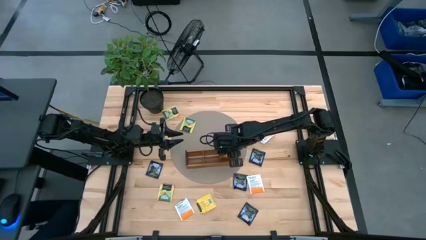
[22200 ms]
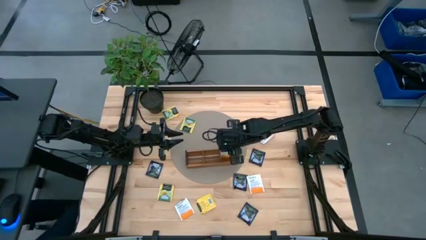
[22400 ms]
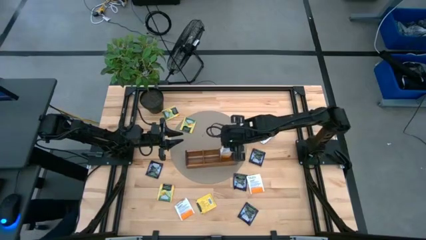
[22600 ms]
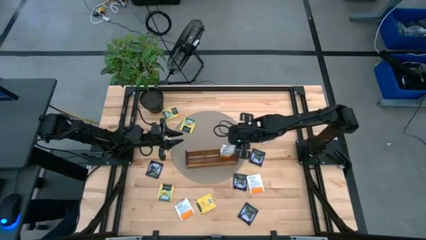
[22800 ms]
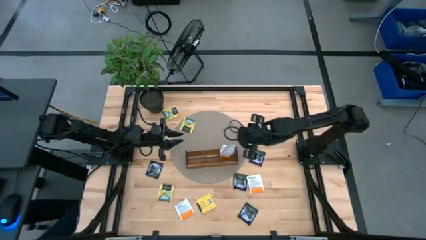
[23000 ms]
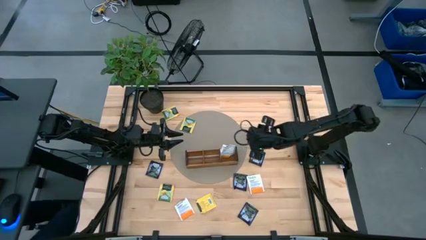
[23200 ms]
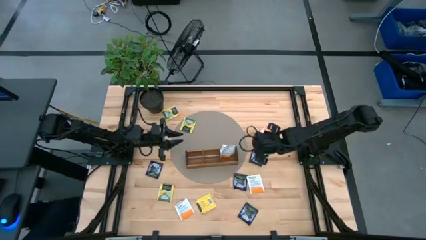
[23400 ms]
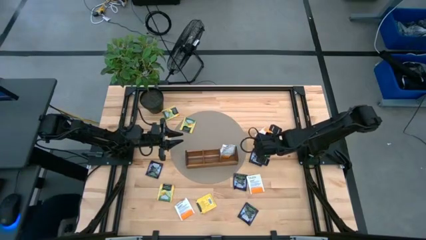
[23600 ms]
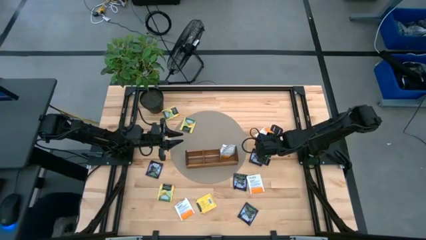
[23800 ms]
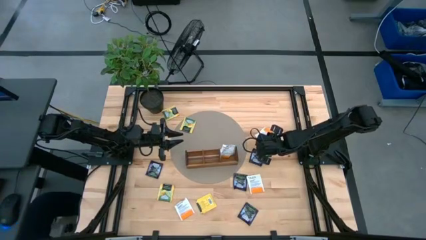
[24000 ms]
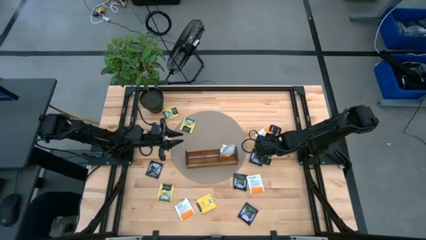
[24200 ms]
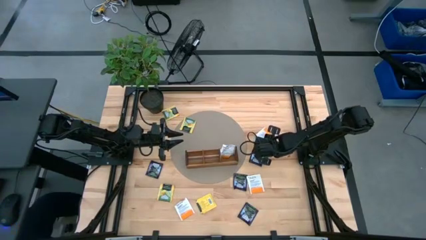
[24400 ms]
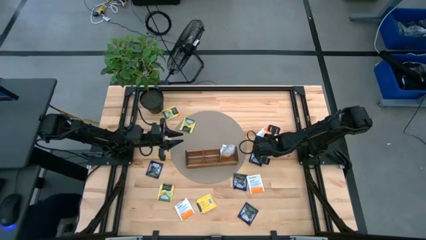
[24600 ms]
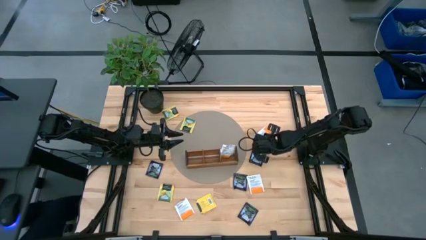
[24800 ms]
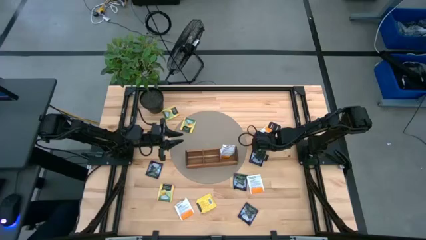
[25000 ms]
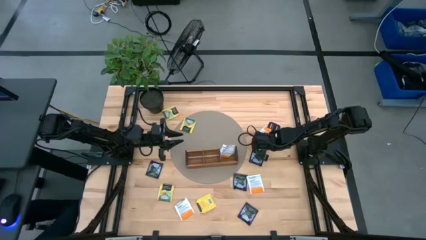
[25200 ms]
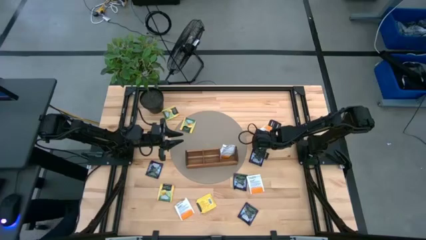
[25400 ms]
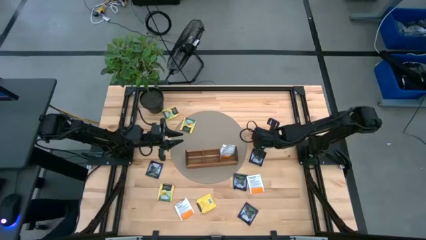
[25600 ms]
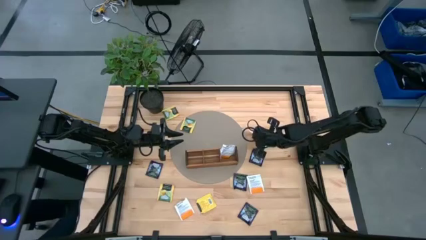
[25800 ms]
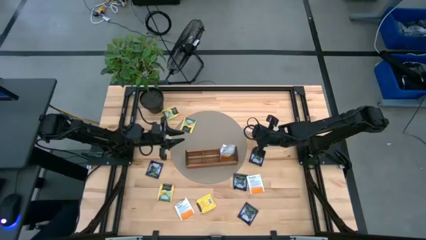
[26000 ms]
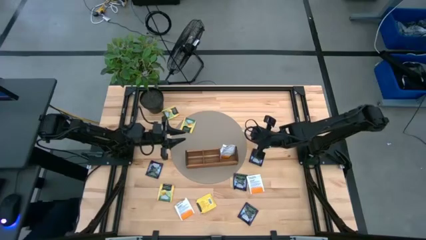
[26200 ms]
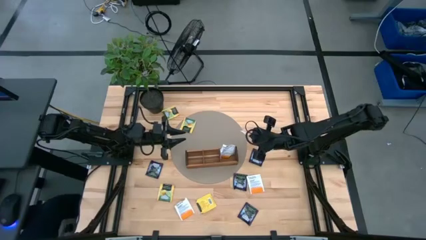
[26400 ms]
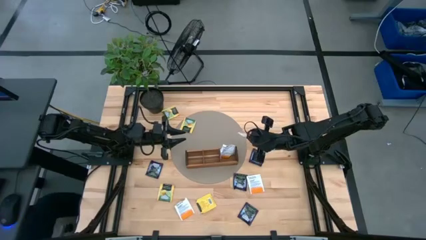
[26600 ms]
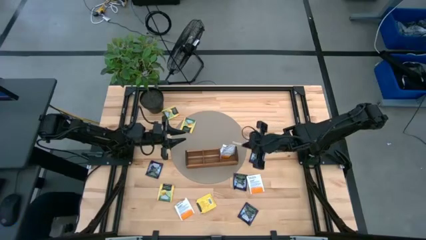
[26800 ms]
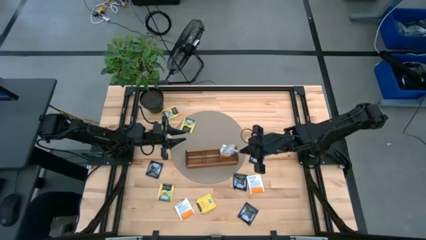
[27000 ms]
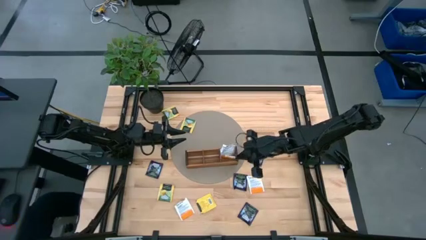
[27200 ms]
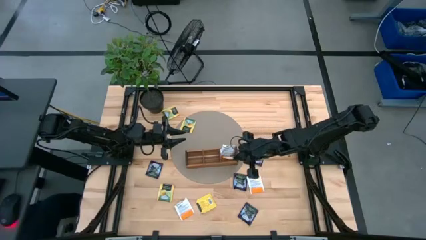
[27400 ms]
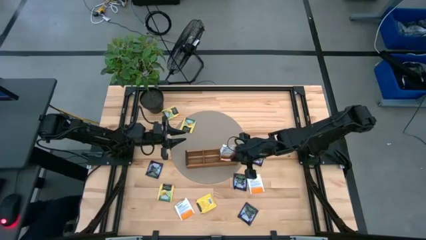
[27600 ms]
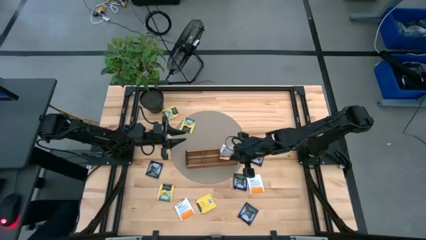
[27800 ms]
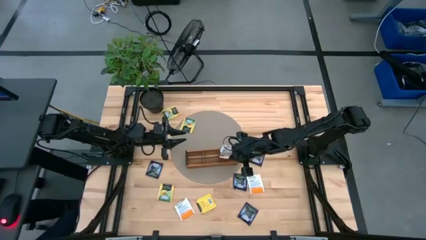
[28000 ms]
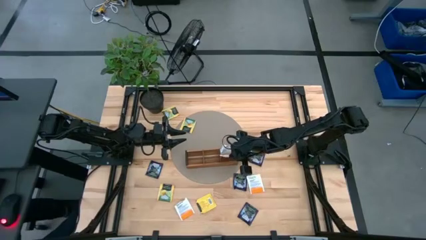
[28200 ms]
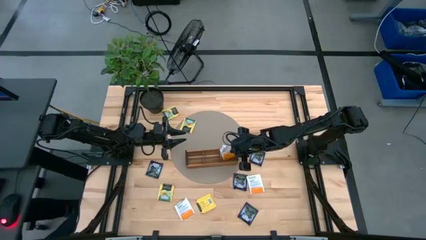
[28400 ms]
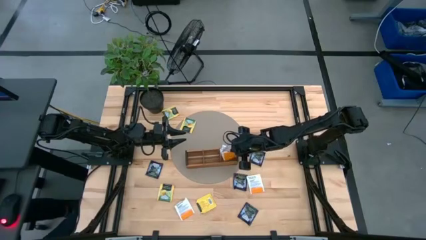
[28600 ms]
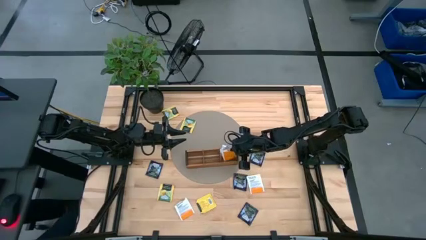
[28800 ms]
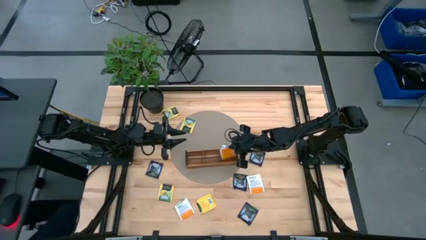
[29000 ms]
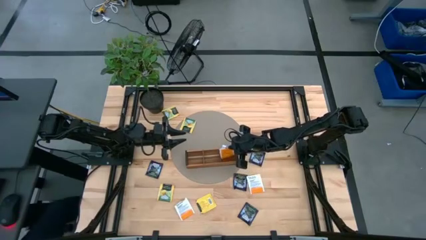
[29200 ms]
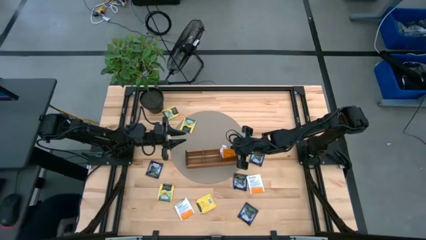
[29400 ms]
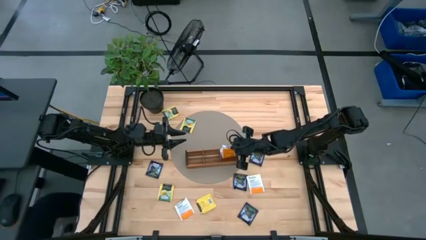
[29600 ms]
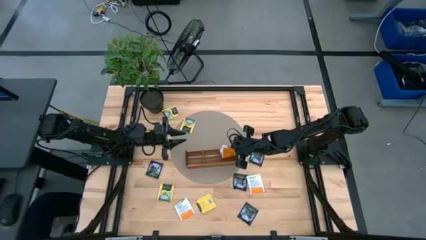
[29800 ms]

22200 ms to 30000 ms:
Task: Pick & Place Tea
Put the white tea bag into the right section of the wooden organizer

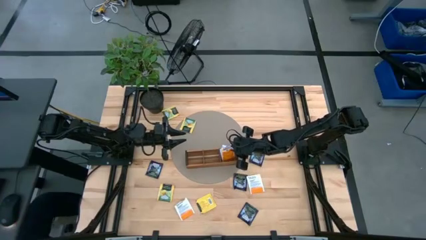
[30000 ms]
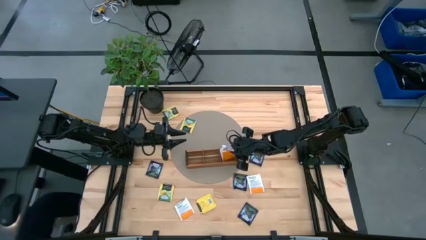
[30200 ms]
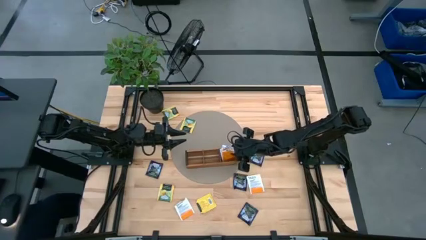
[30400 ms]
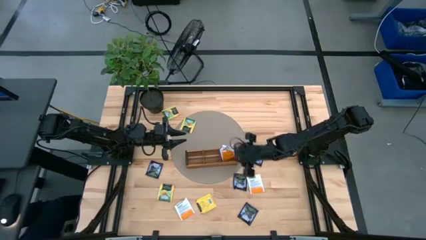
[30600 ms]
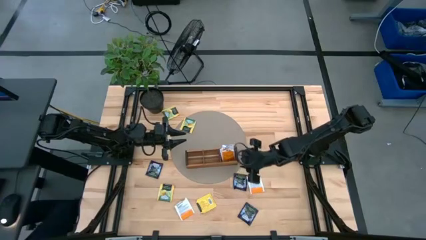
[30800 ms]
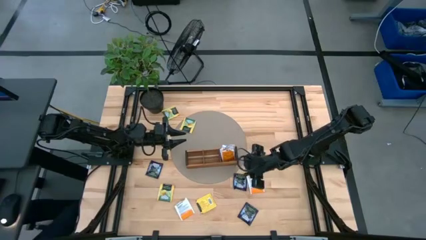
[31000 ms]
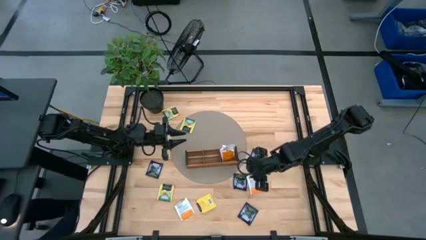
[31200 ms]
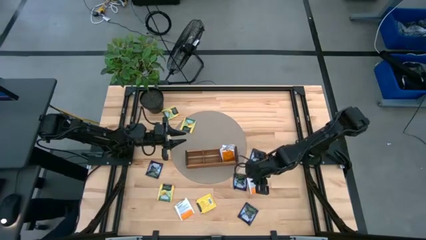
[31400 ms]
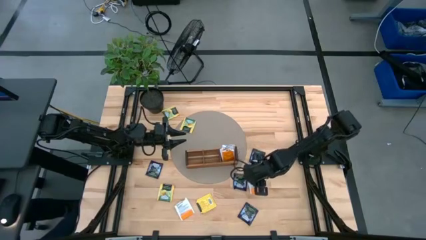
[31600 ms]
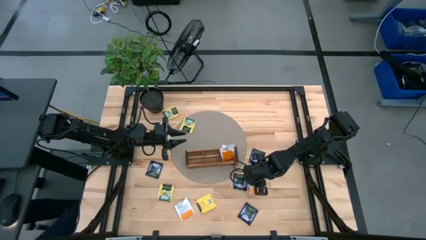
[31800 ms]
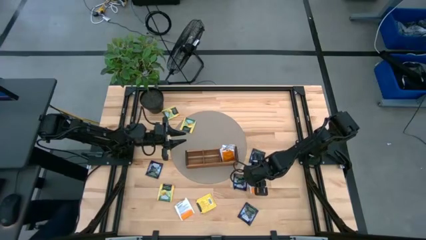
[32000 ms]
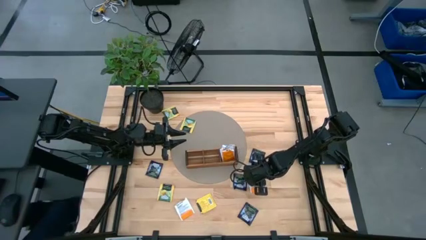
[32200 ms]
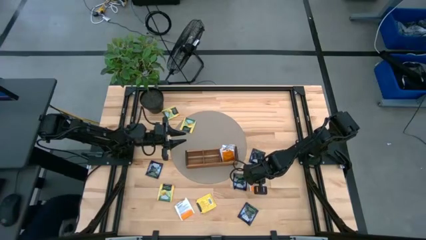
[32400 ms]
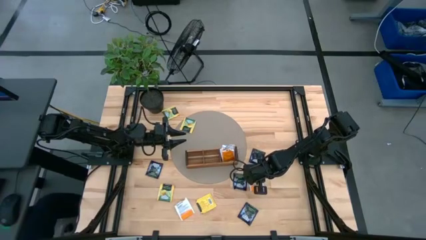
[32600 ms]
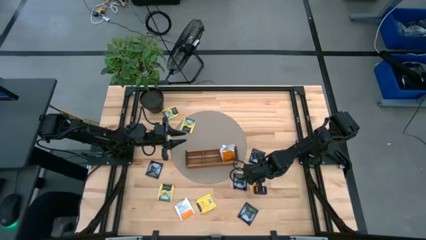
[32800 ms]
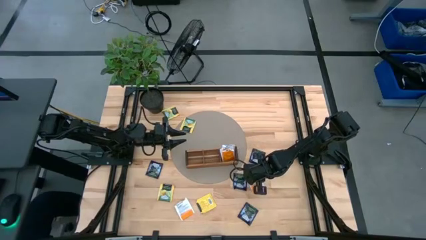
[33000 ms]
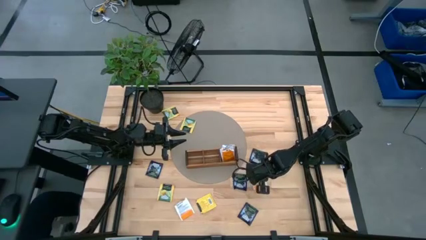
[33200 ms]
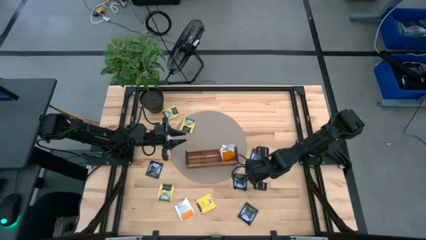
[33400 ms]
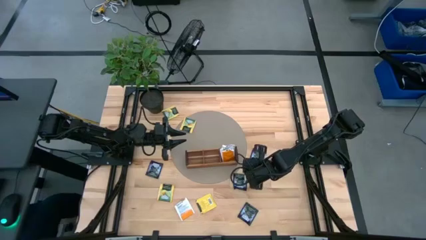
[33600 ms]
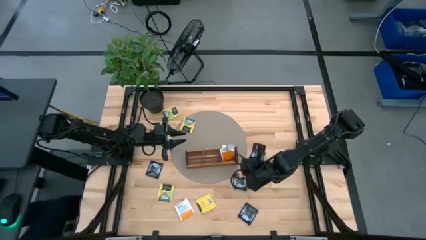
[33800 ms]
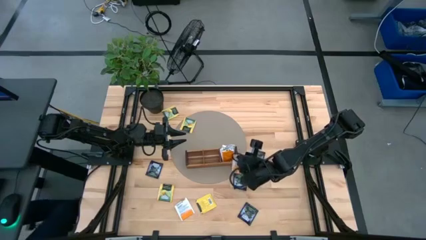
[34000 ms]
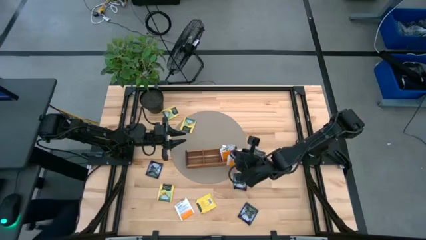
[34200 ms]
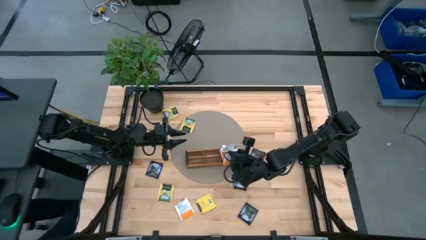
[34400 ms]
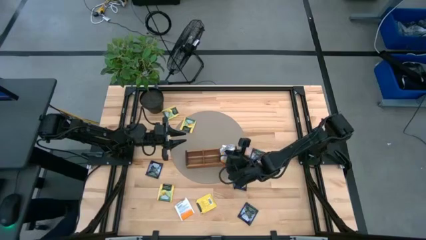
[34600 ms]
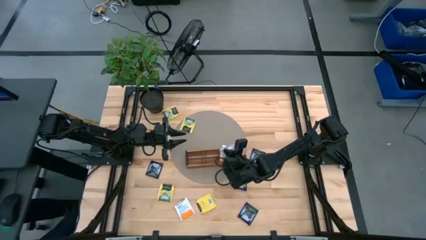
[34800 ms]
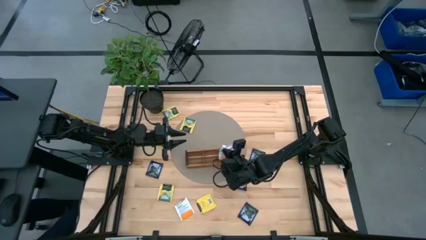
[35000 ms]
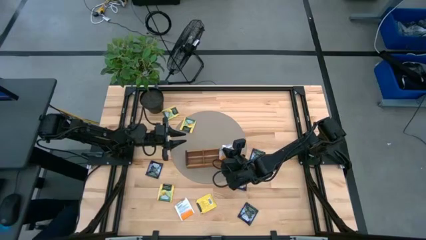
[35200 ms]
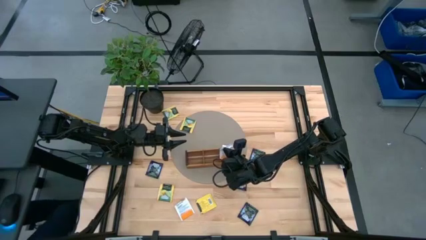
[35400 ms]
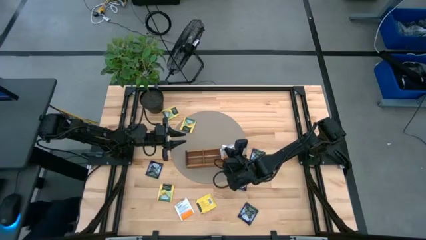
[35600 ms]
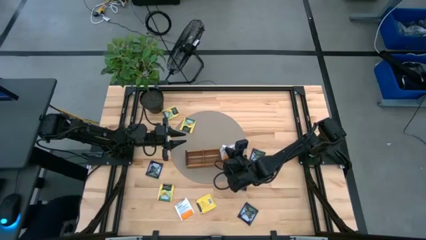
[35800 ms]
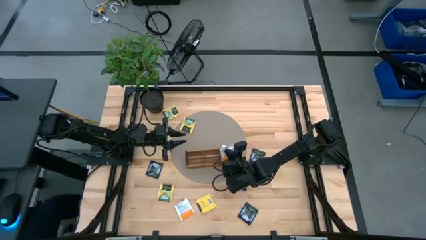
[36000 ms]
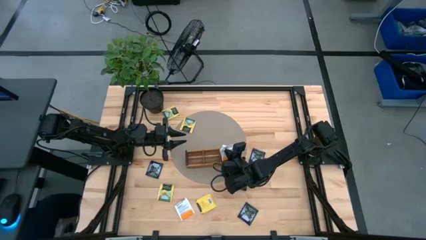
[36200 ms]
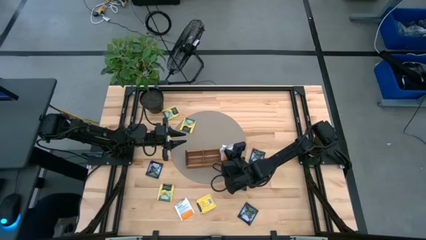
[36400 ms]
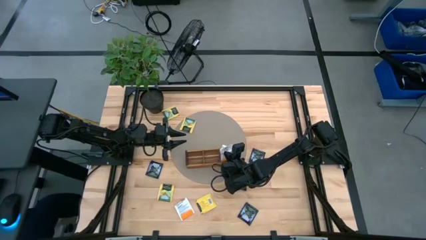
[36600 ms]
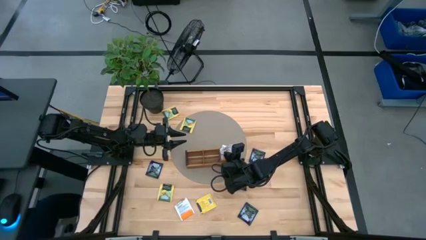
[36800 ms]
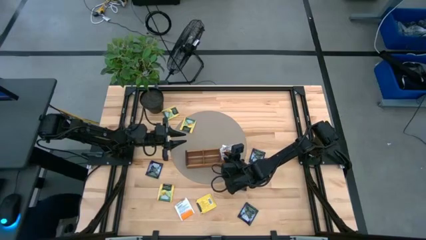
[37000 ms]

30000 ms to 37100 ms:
Put the white tea bag into the right section of the wooden organizer

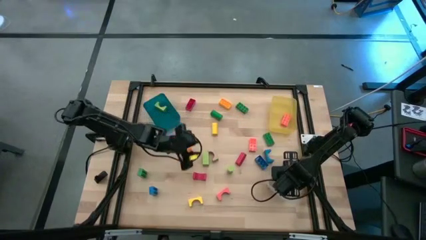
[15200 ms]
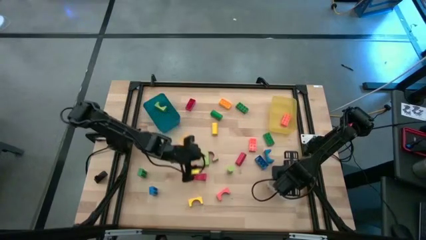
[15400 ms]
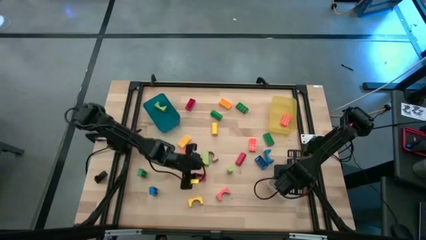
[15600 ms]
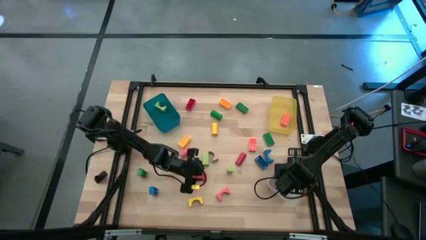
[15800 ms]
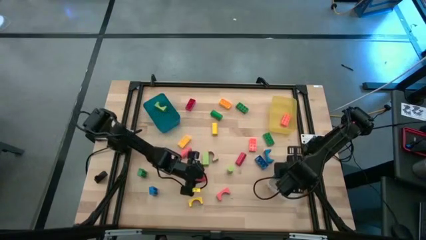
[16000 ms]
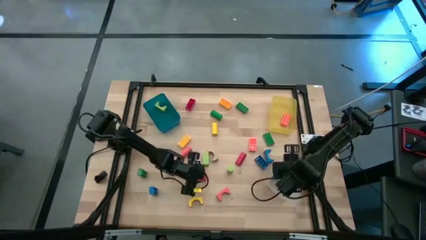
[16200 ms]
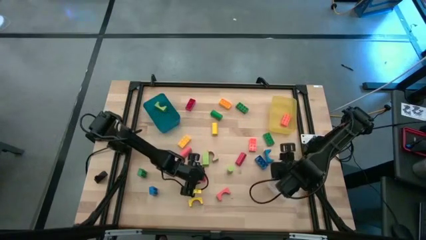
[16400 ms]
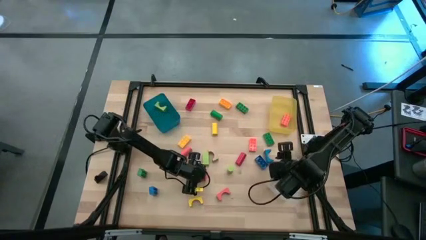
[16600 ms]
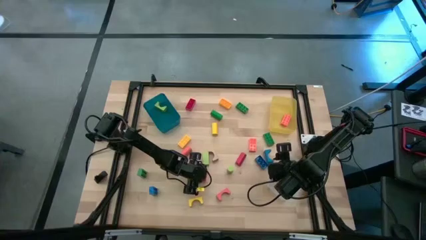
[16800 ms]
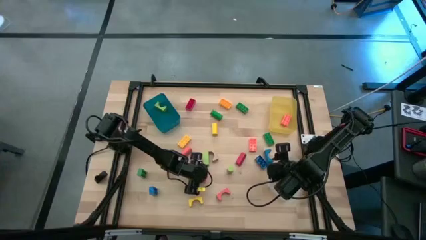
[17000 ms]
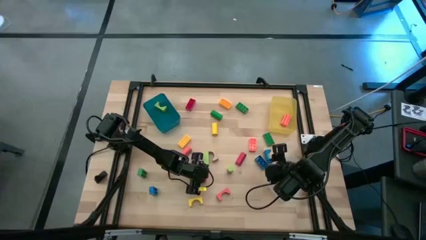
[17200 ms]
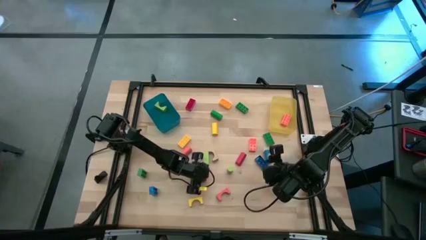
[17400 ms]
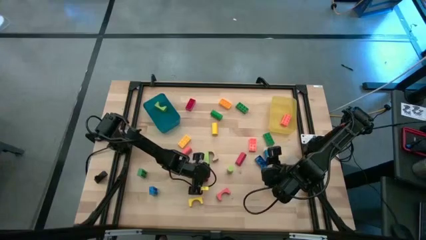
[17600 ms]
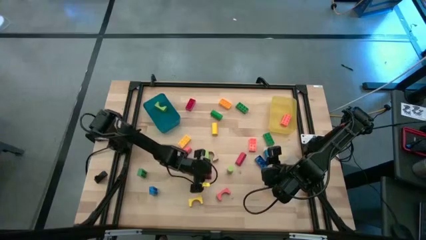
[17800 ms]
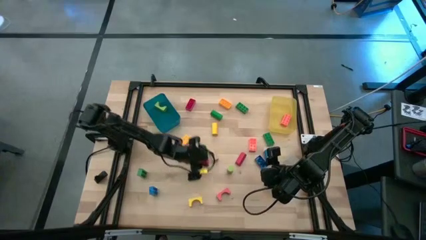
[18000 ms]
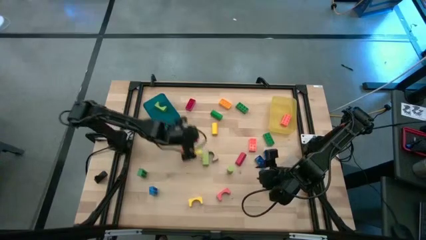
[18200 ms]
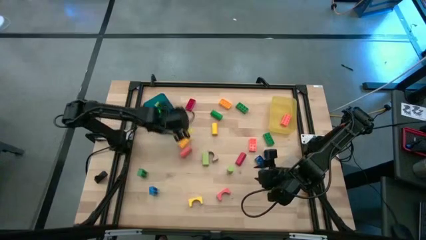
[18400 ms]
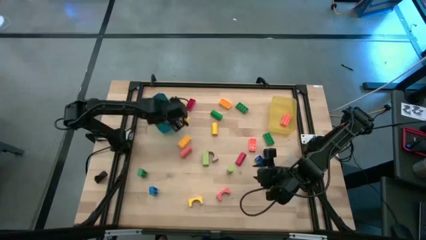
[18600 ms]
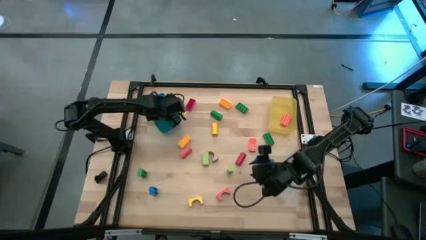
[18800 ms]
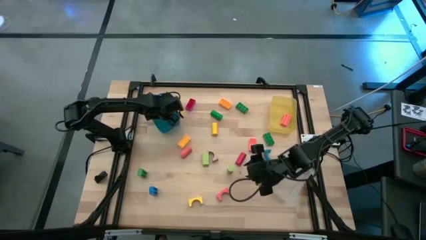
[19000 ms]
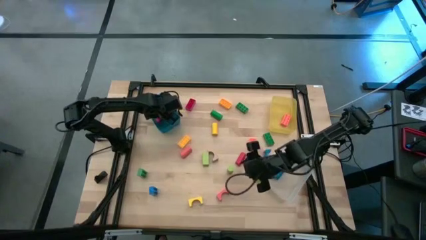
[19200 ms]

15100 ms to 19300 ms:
Task: Sort blocks by size
Put the red arch block into the blue bin
